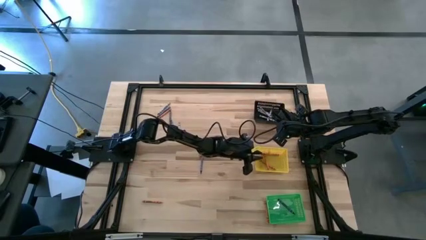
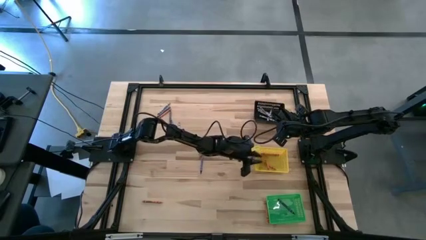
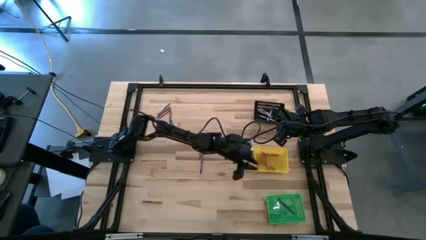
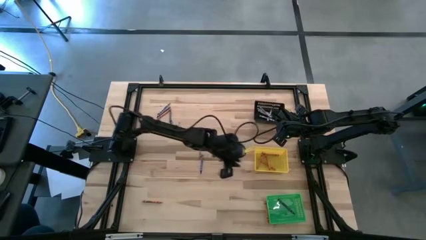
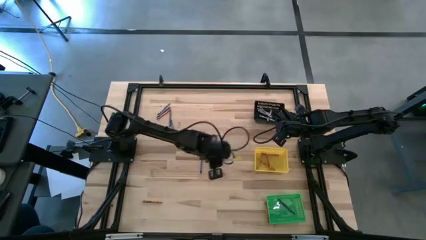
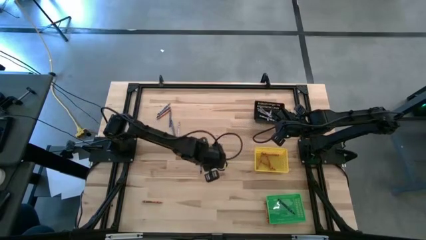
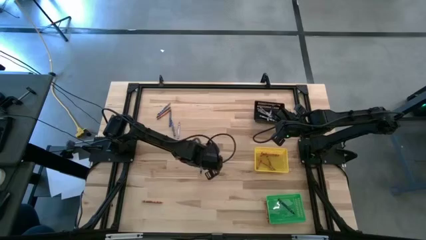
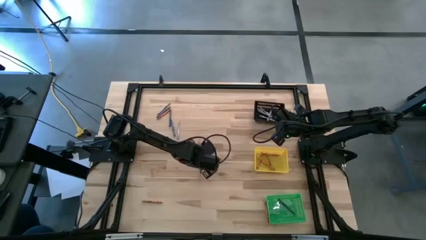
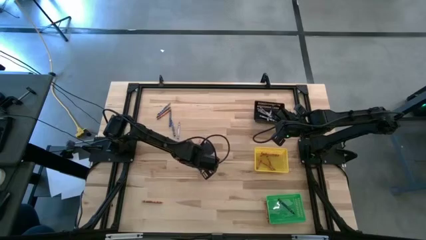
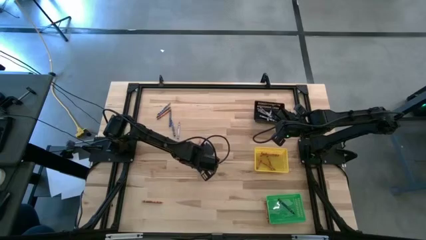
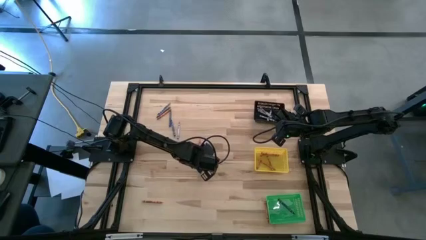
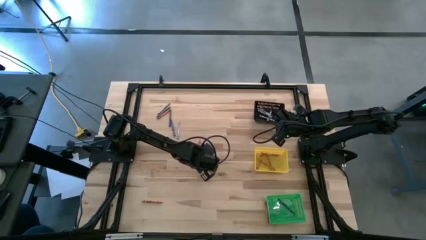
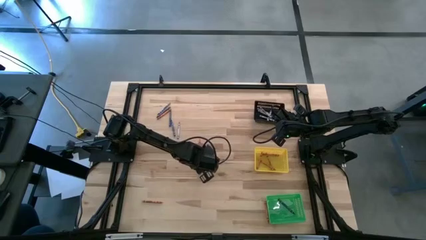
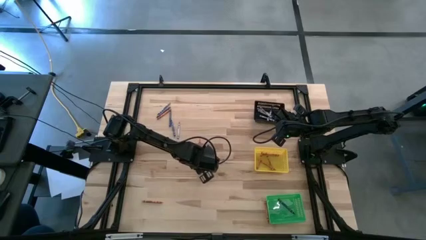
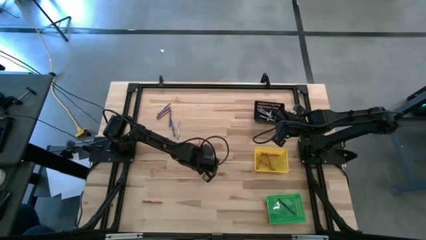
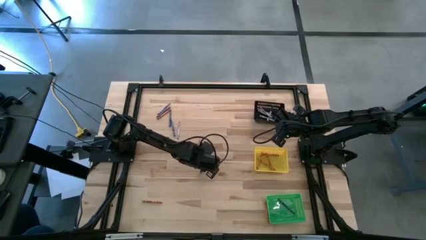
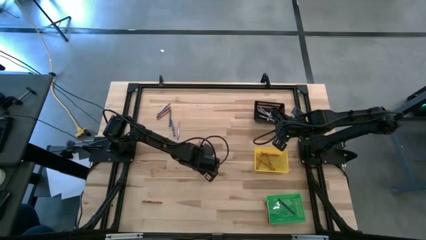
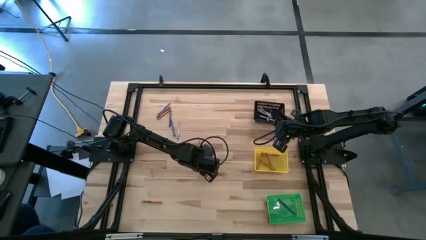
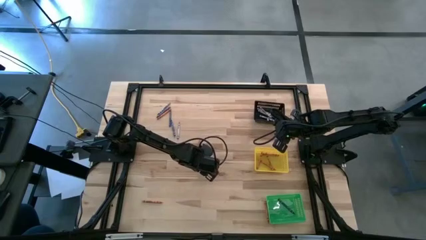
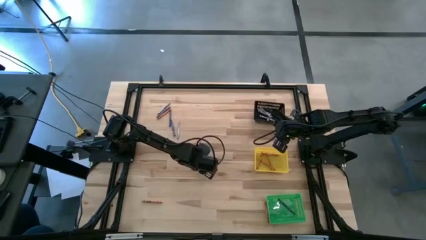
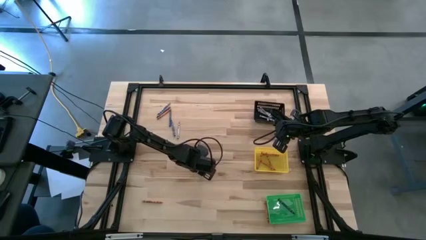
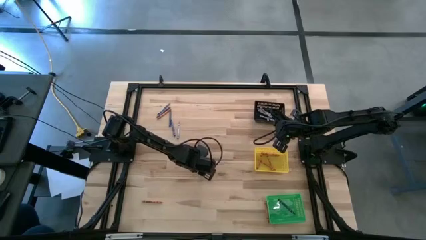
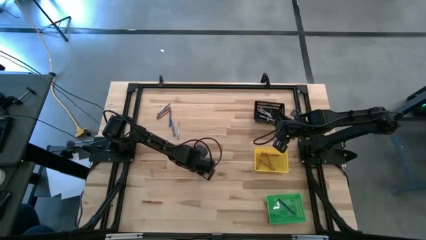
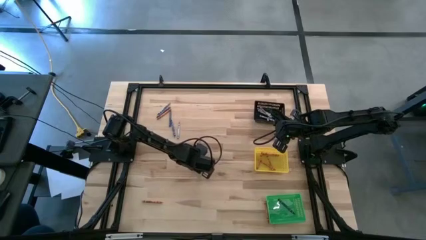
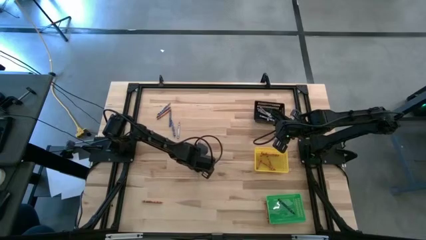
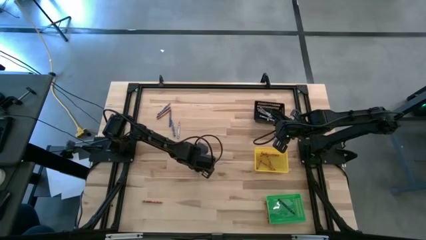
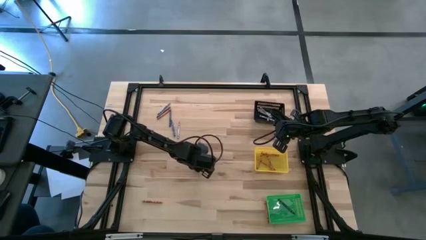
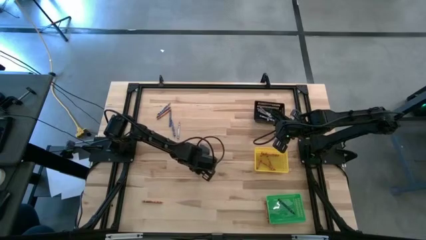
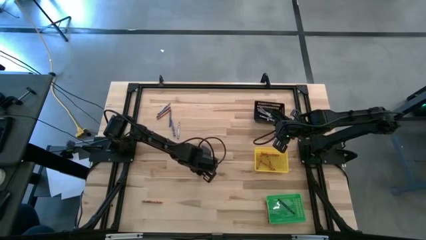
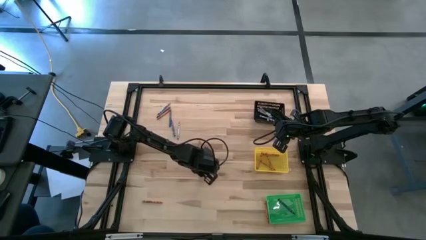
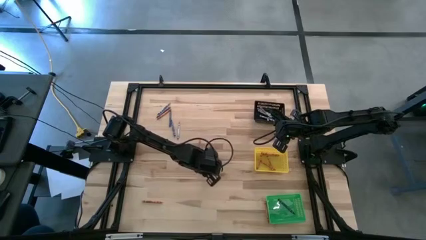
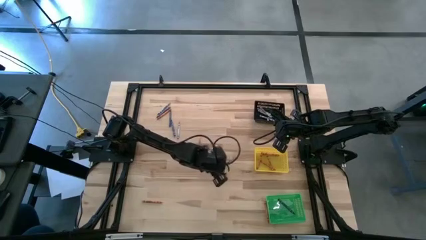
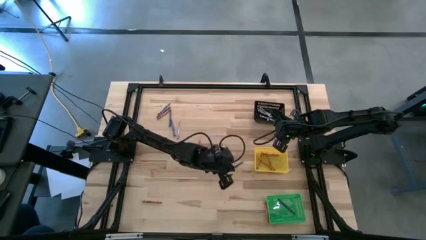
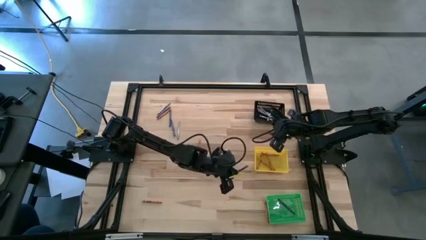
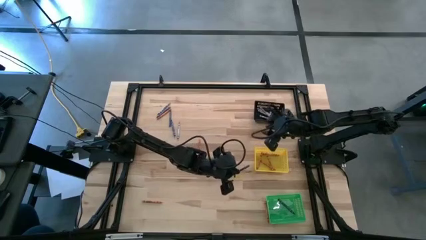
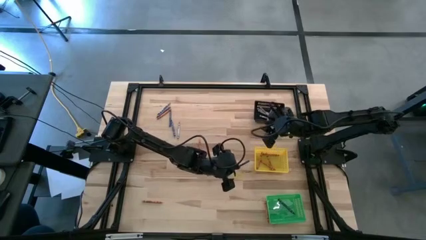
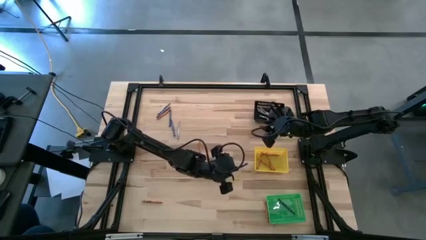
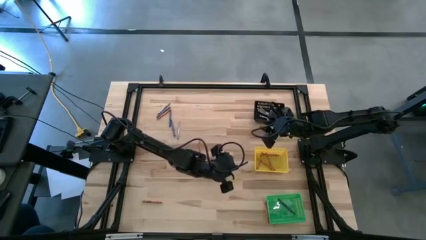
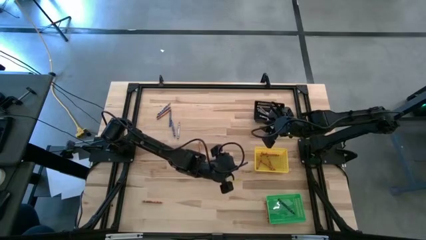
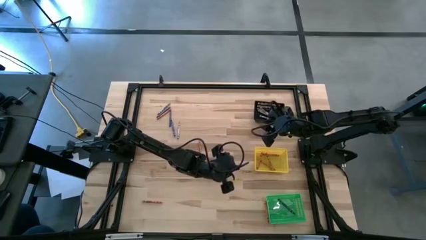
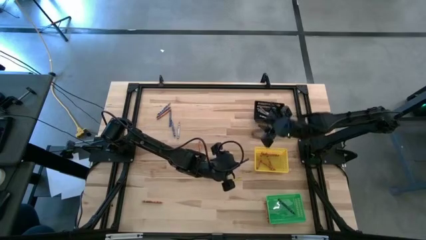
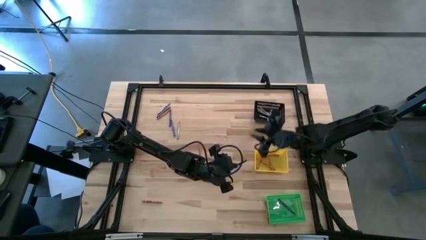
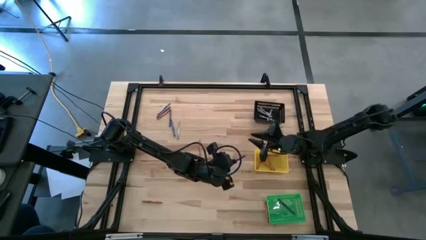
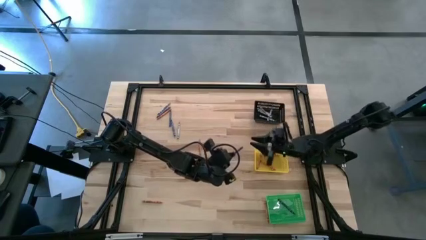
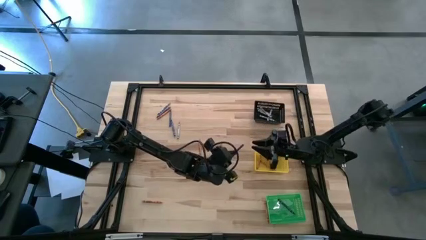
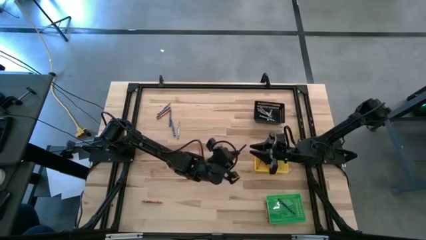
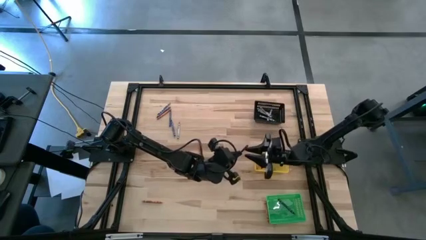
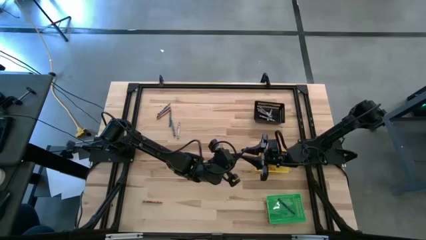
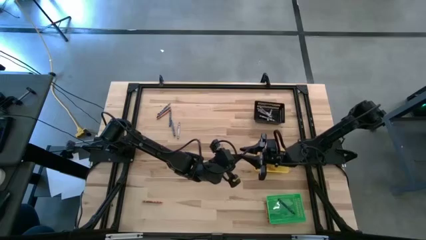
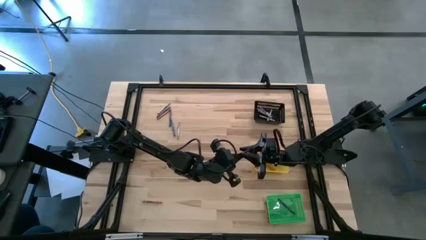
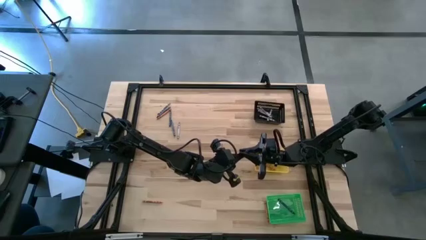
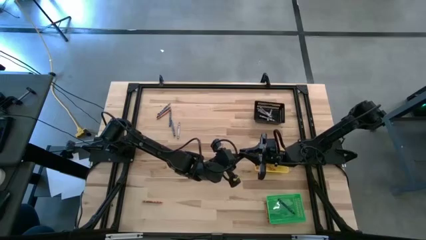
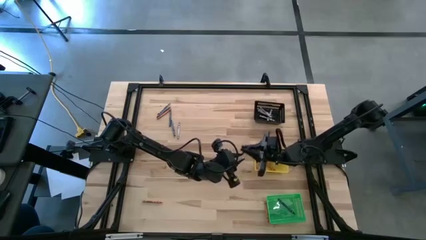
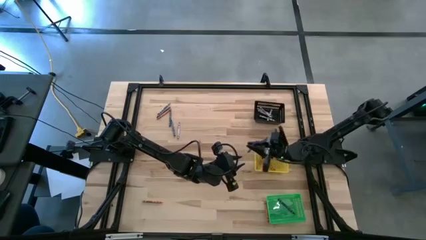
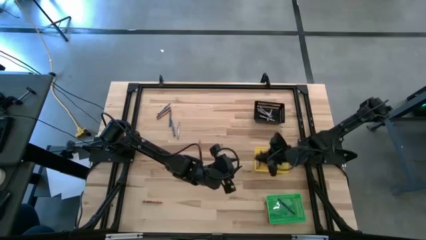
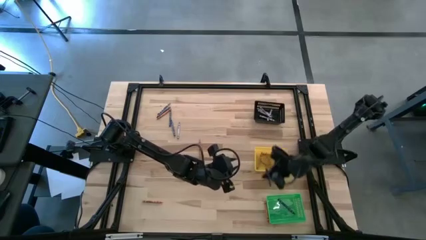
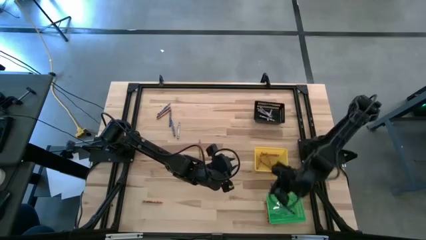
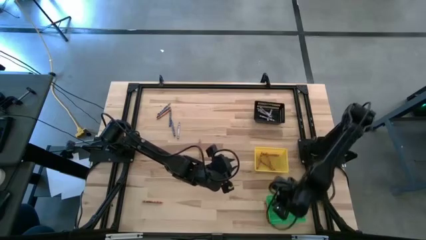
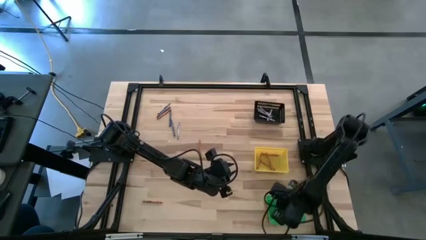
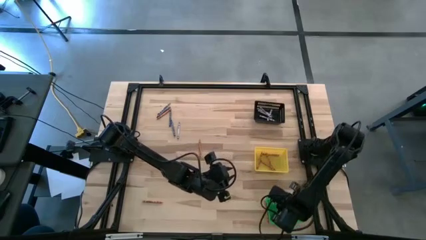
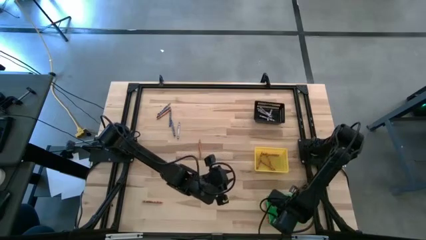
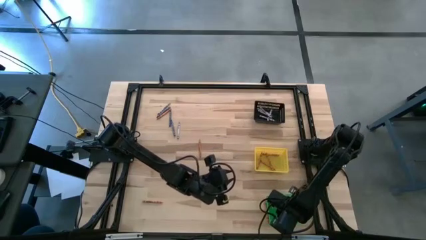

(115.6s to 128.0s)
Task: Sort crayons
Put the blue crayon into the green basket

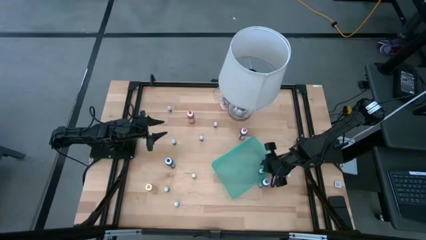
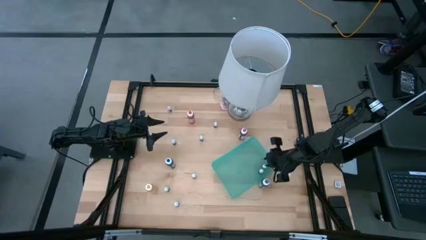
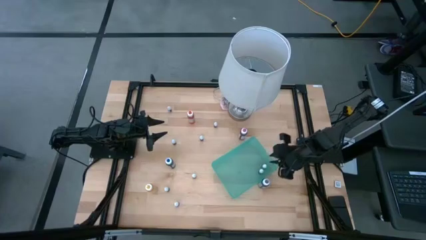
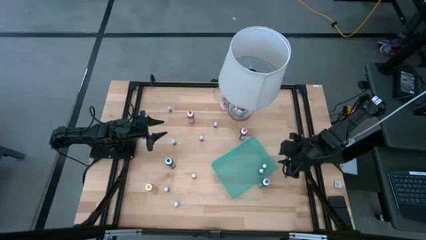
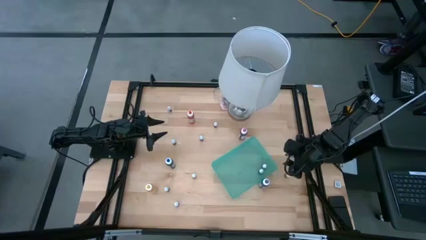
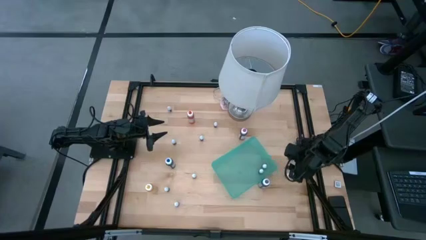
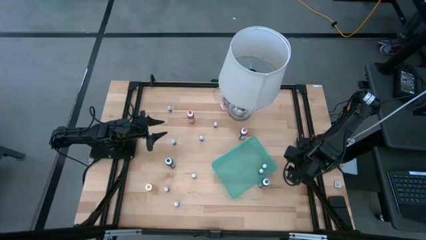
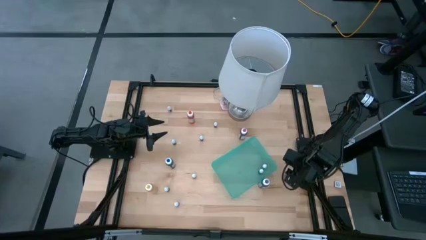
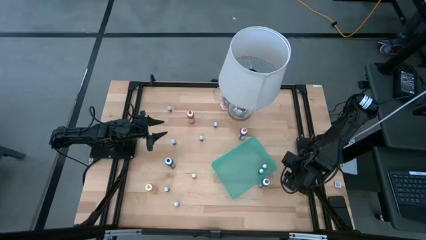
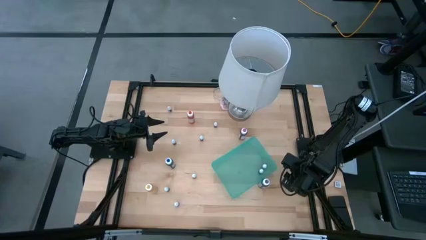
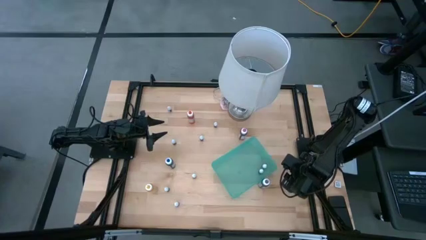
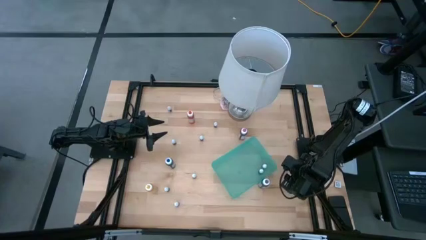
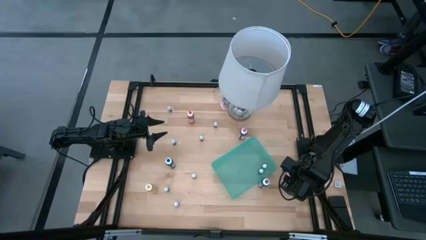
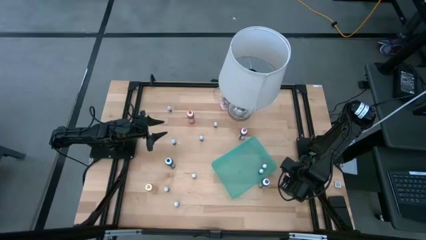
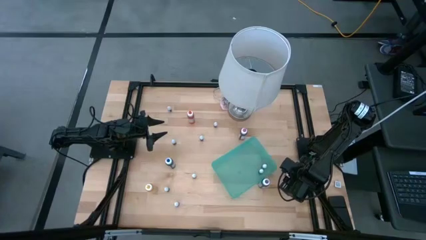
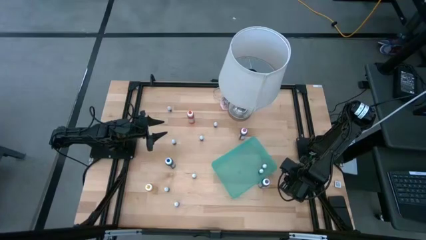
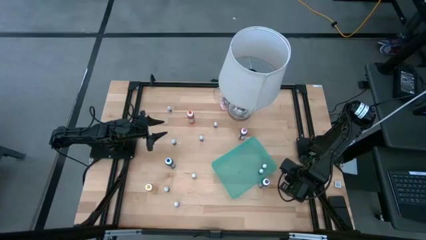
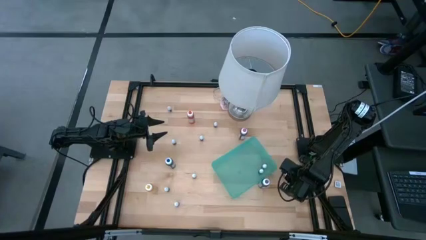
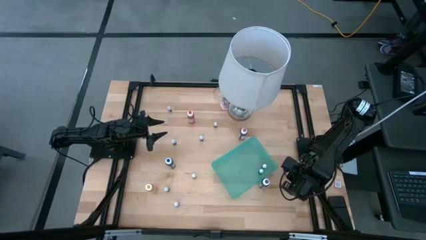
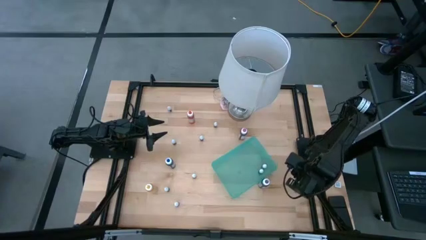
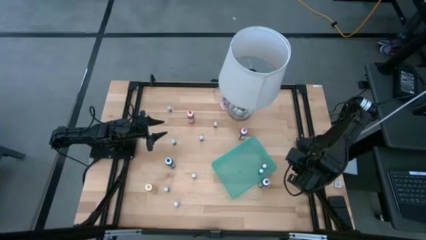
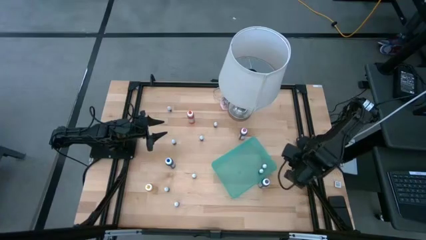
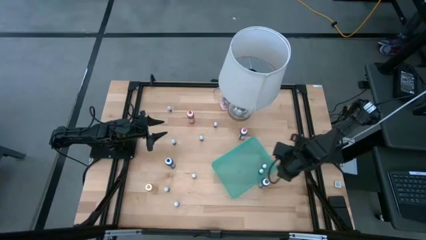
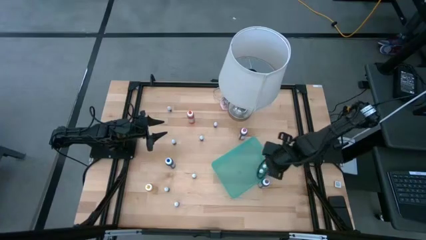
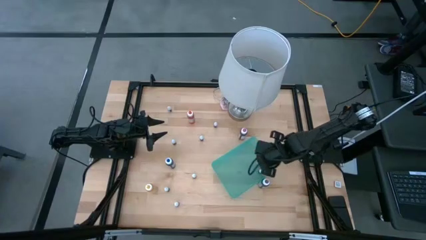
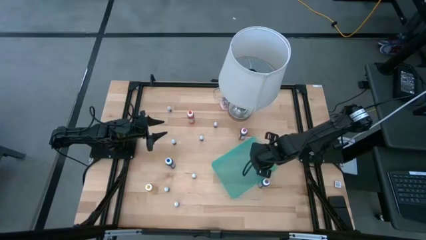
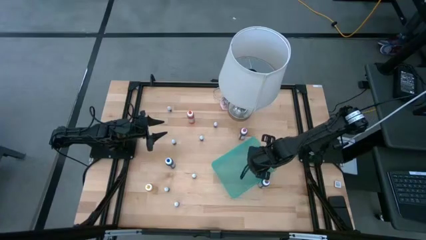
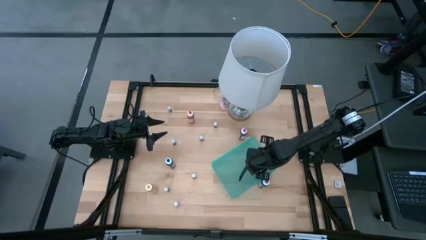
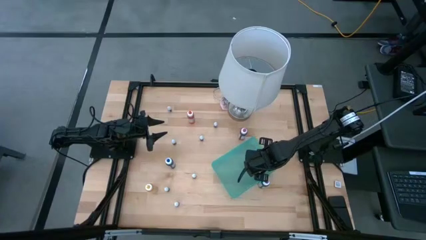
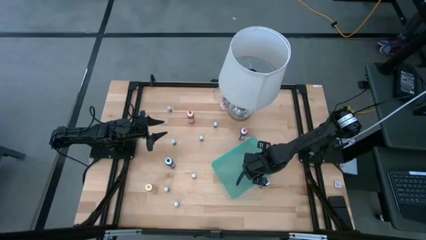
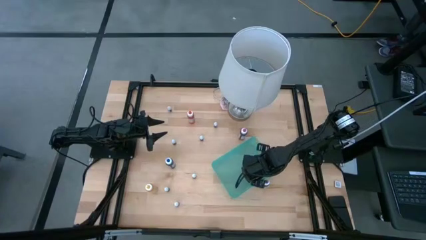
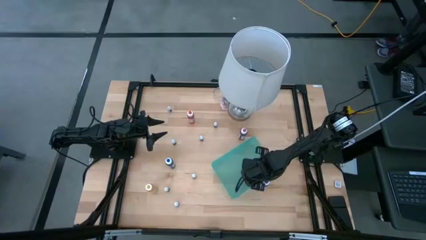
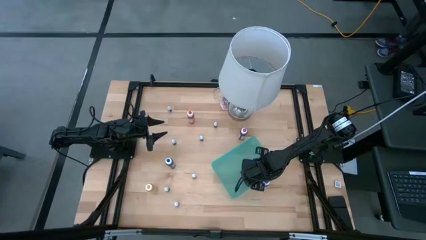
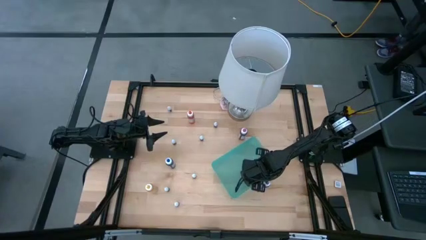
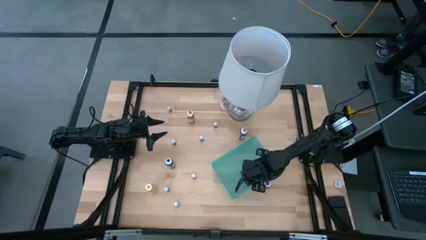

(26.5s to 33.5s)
Task: Pick & Place food coloring
Put the small pink food coloring bottle into the green bin
